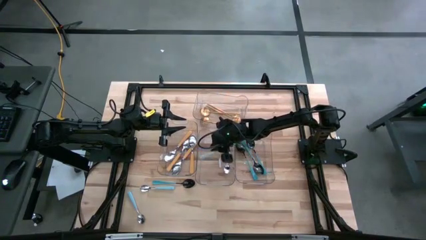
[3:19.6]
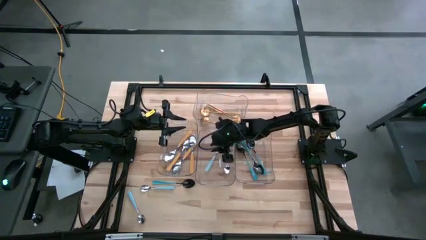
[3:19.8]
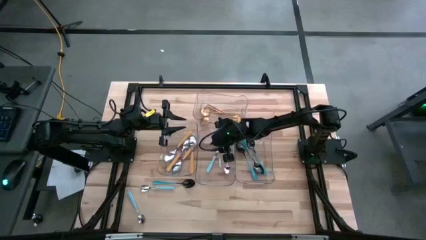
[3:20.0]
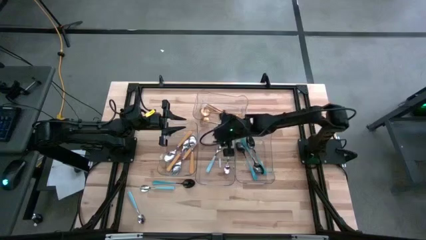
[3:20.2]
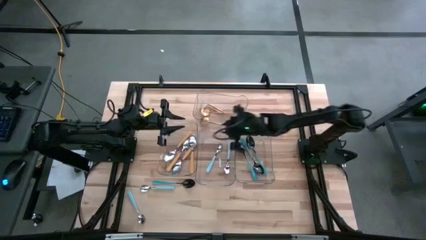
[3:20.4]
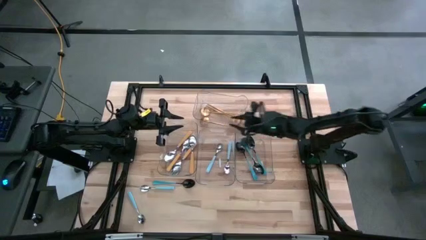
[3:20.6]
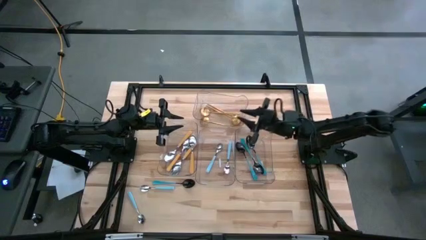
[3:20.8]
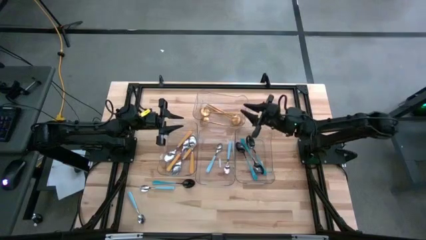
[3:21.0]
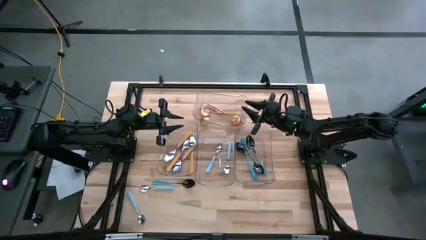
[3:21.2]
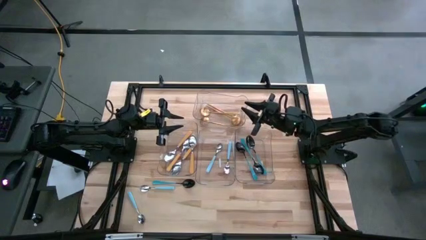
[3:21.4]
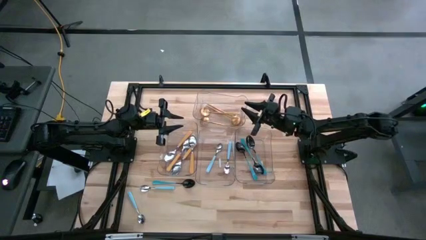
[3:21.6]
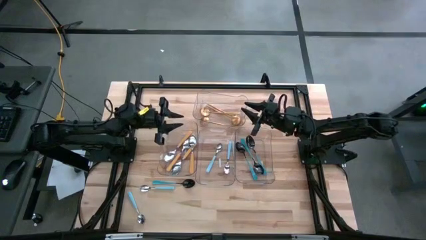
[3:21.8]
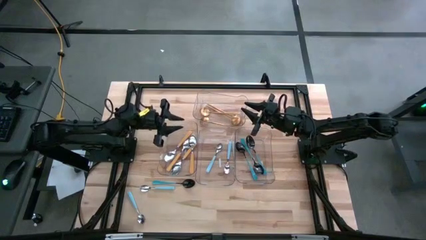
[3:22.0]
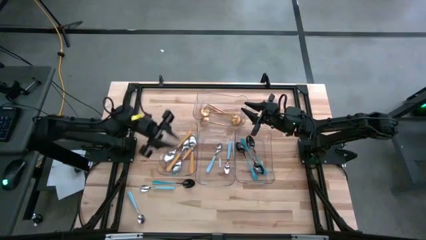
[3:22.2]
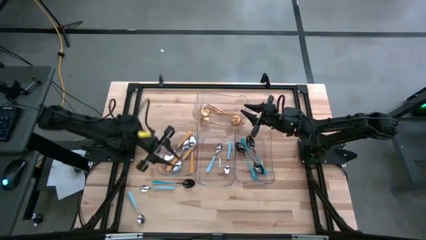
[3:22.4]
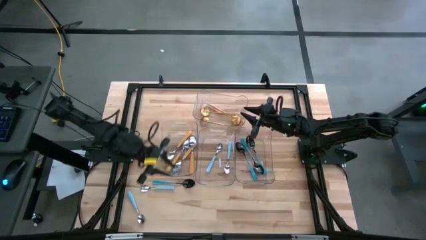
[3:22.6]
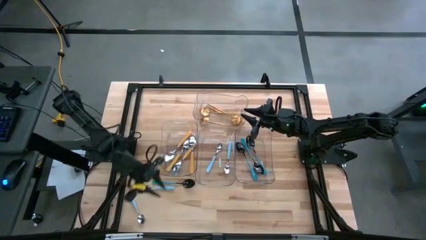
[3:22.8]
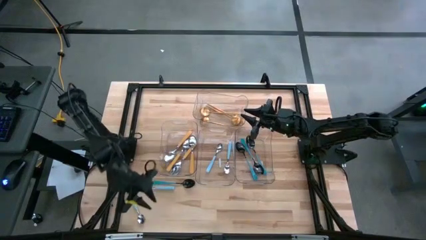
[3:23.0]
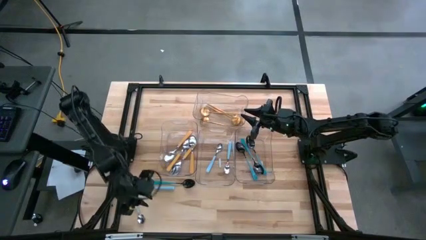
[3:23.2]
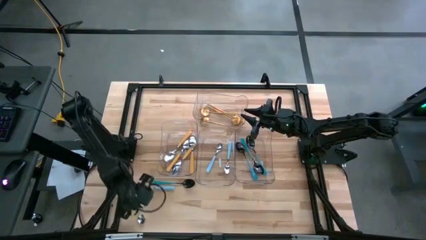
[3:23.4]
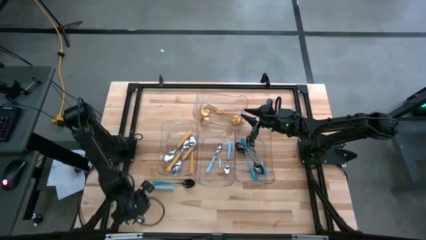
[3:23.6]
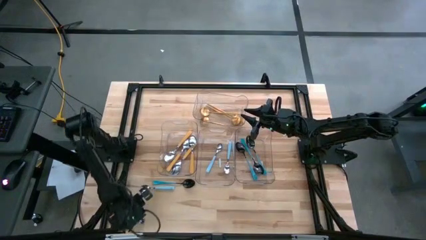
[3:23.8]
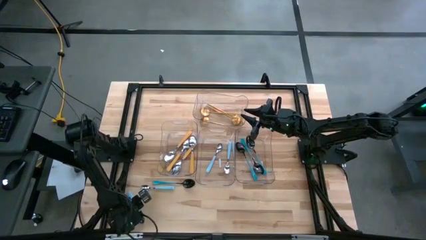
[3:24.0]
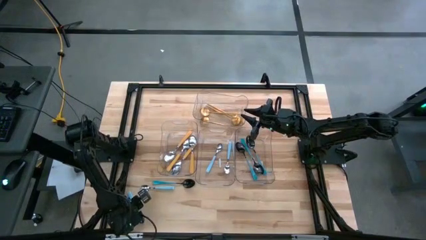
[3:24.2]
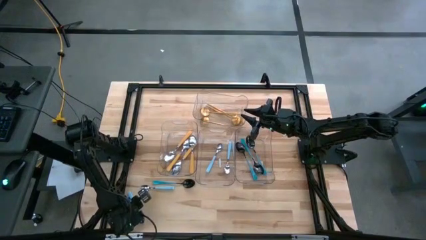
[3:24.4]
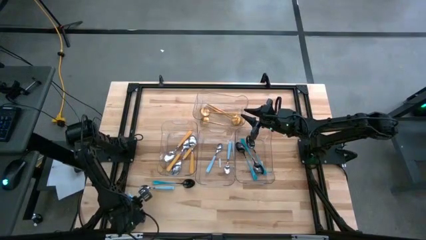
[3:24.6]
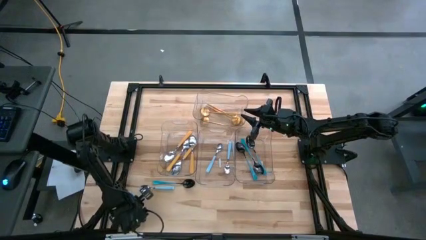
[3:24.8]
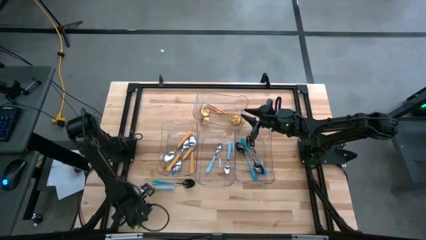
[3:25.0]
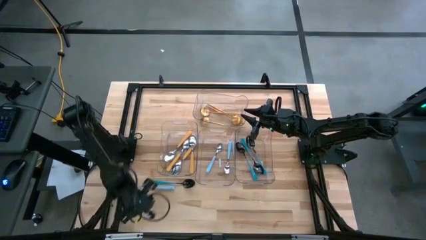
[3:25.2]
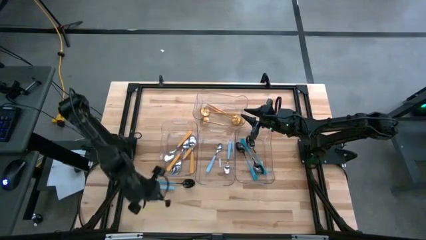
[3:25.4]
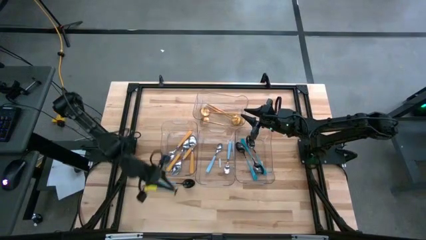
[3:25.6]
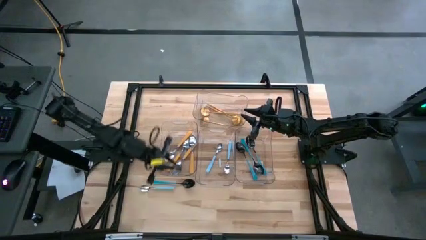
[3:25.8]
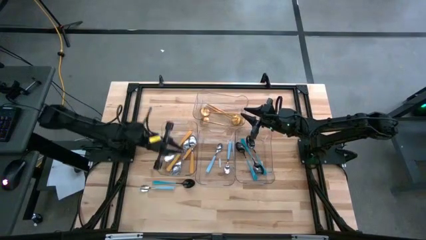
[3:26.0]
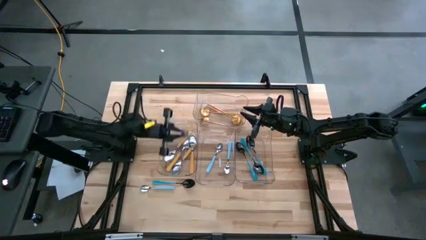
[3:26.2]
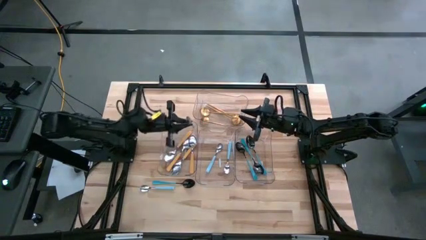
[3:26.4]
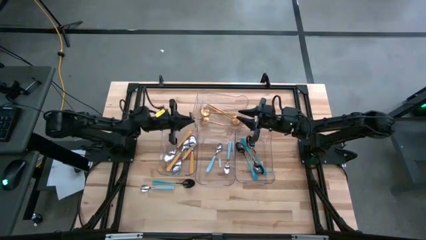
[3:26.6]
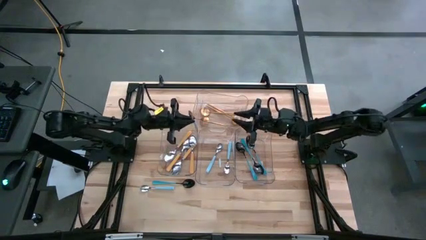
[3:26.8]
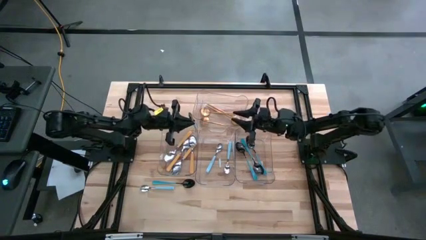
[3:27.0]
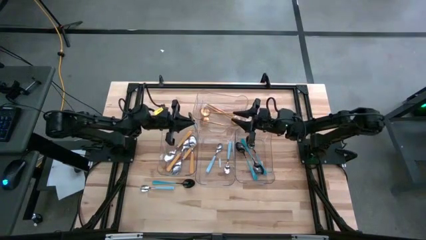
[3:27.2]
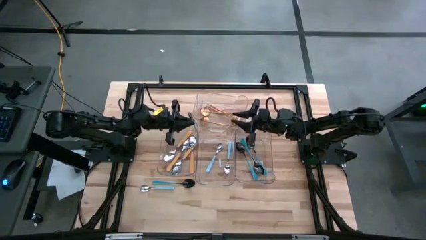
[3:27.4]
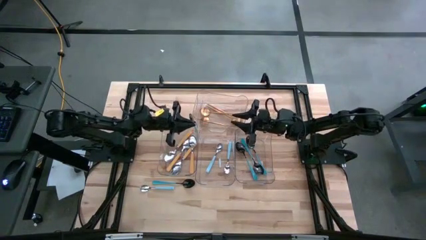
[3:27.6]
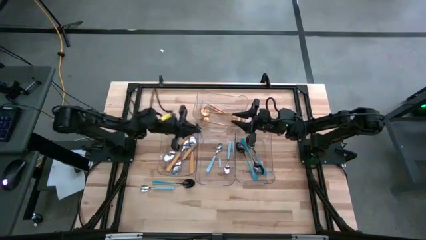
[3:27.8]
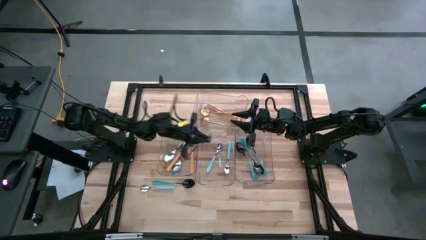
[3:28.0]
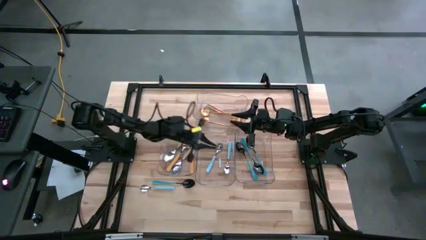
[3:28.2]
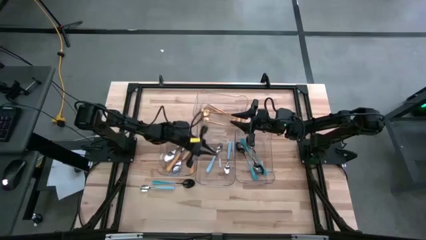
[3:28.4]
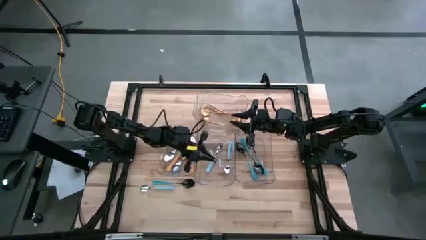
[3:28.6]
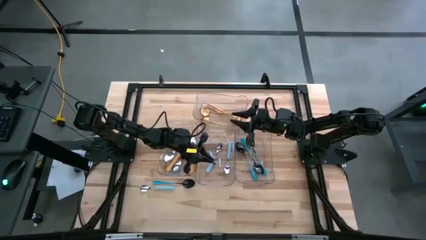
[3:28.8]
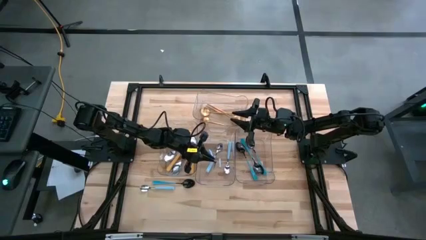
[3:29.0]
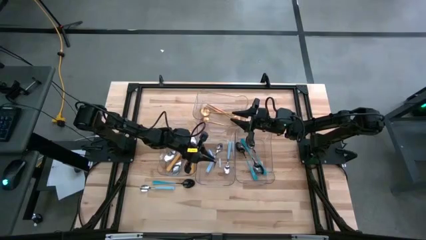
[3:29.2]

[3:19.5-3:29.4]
Task: Sort silverware by color (type)
Put the light blue spoon into the middle transparent bin

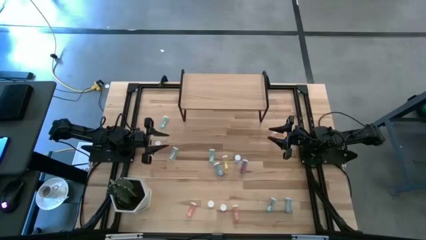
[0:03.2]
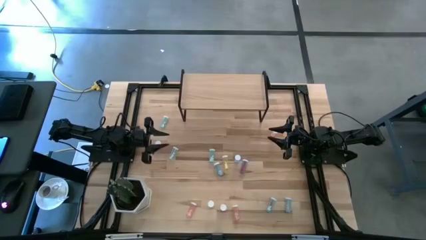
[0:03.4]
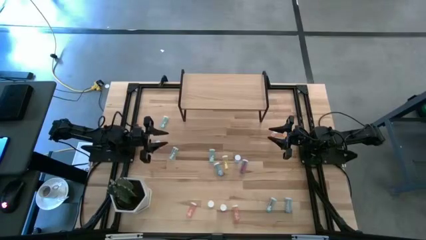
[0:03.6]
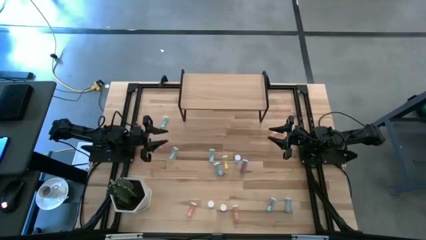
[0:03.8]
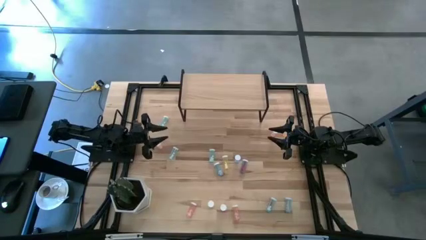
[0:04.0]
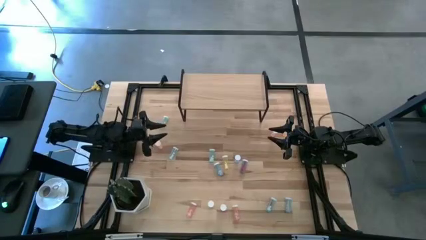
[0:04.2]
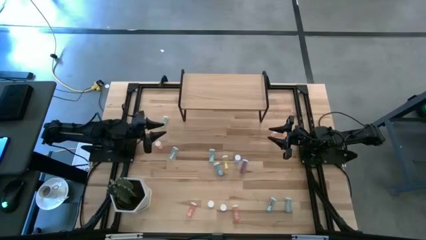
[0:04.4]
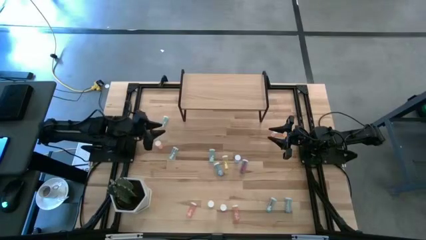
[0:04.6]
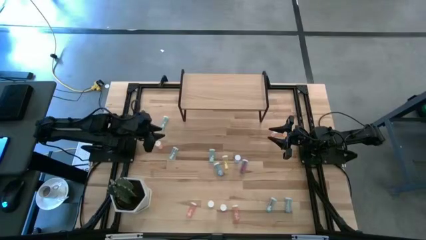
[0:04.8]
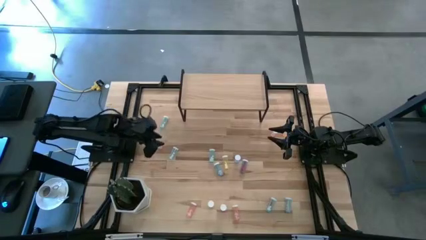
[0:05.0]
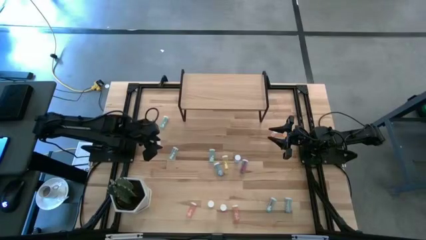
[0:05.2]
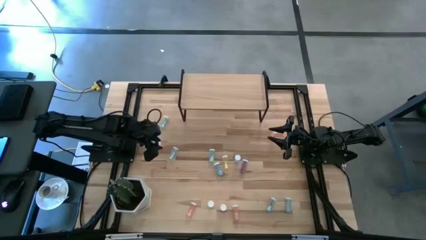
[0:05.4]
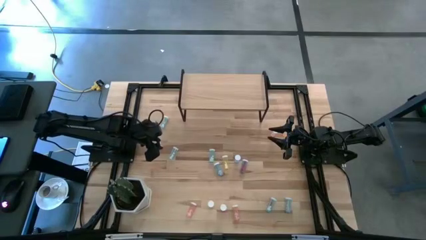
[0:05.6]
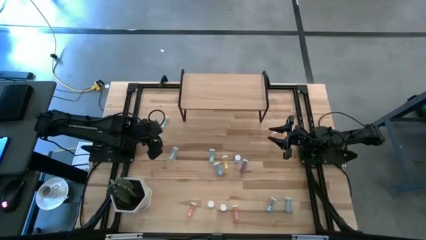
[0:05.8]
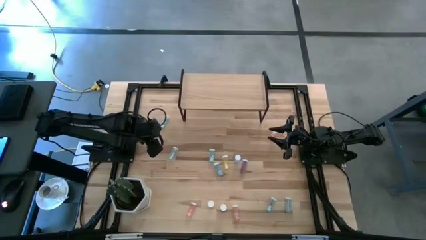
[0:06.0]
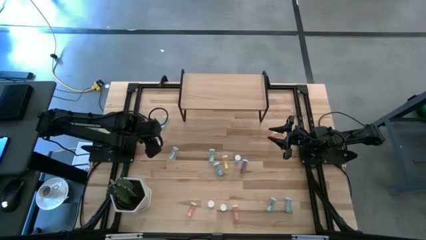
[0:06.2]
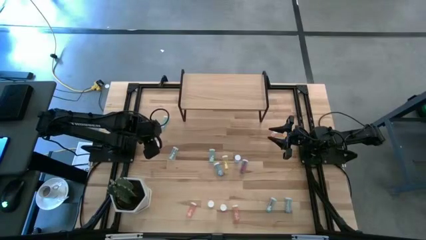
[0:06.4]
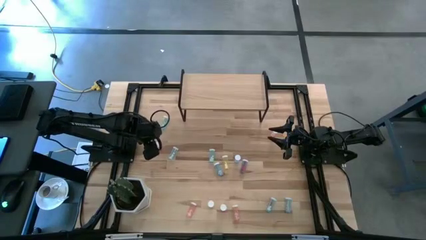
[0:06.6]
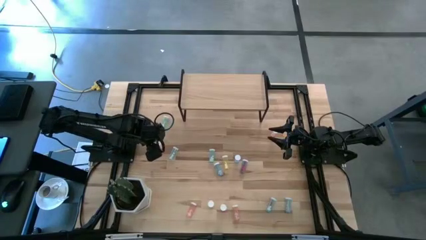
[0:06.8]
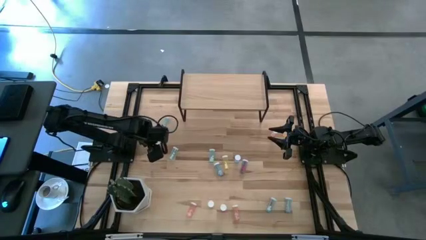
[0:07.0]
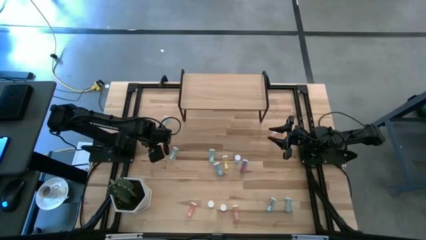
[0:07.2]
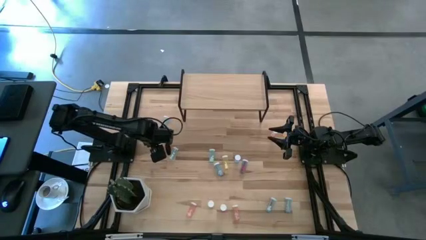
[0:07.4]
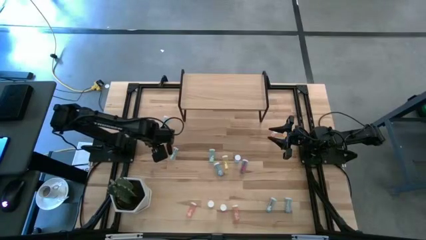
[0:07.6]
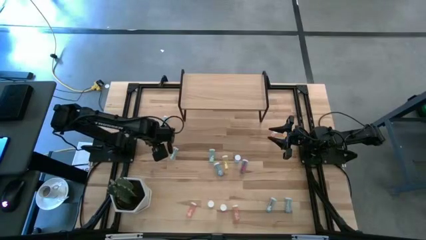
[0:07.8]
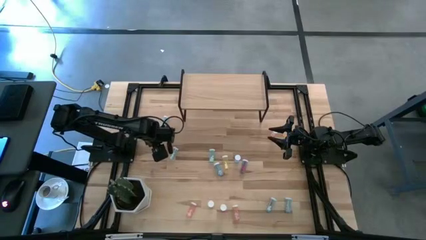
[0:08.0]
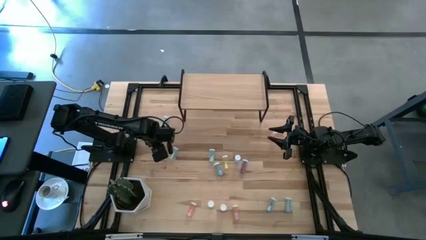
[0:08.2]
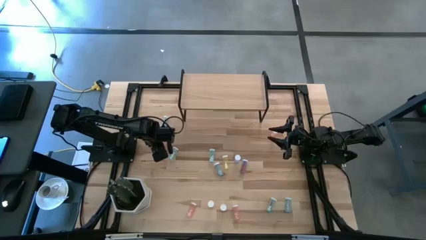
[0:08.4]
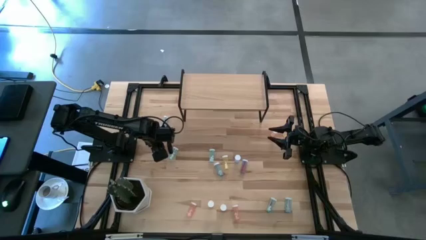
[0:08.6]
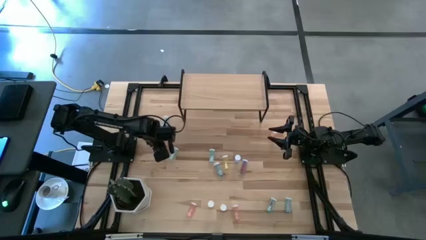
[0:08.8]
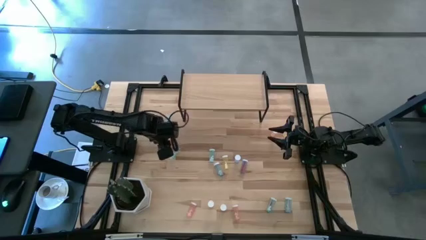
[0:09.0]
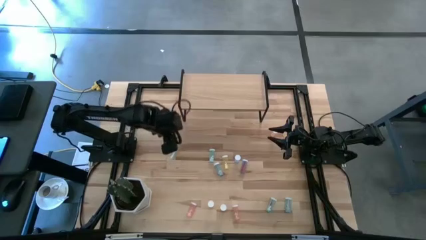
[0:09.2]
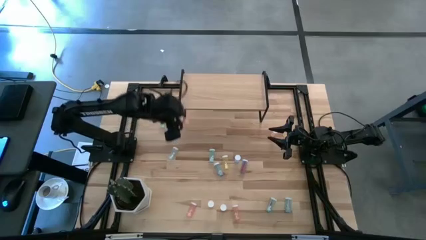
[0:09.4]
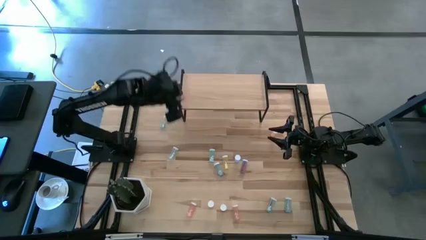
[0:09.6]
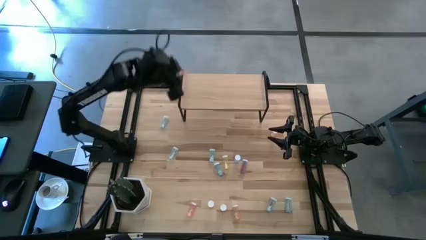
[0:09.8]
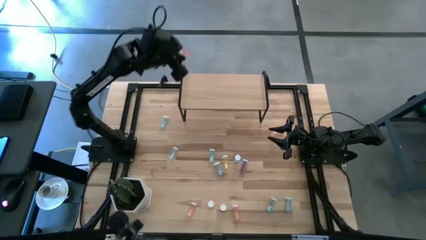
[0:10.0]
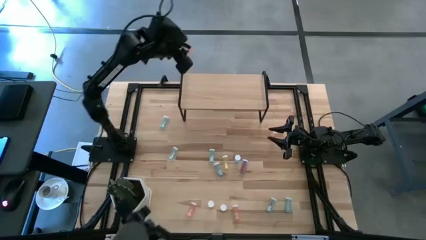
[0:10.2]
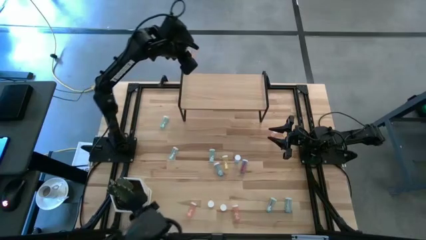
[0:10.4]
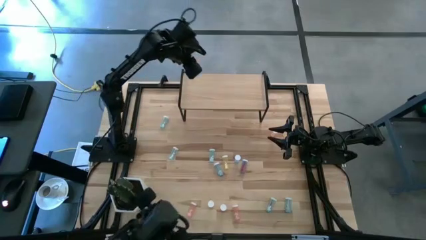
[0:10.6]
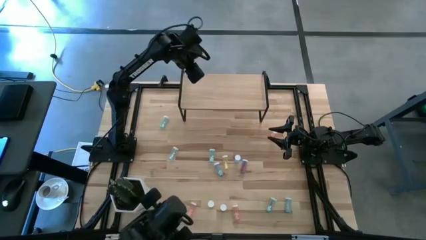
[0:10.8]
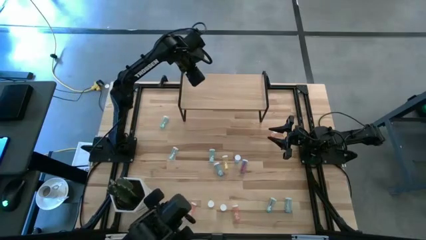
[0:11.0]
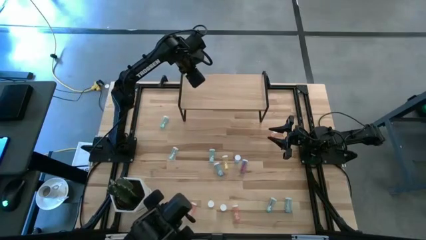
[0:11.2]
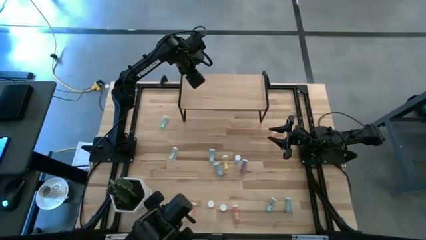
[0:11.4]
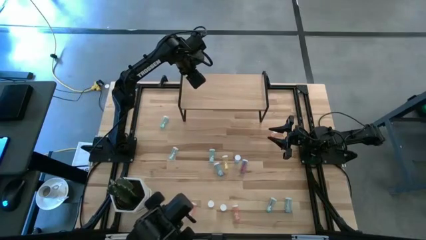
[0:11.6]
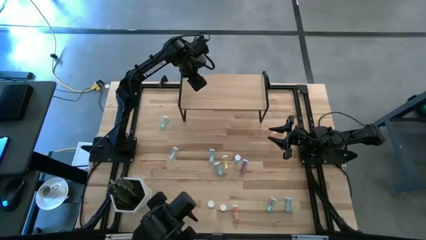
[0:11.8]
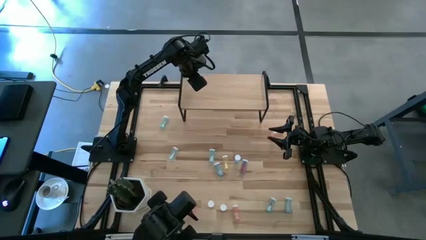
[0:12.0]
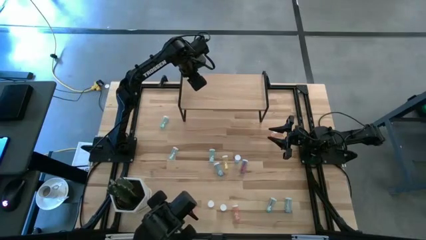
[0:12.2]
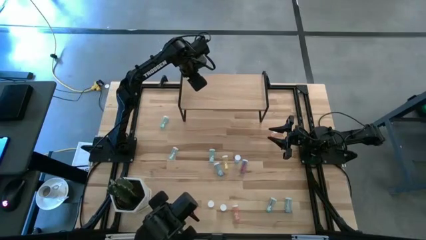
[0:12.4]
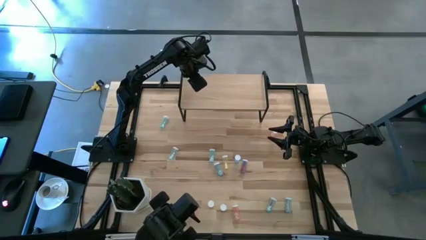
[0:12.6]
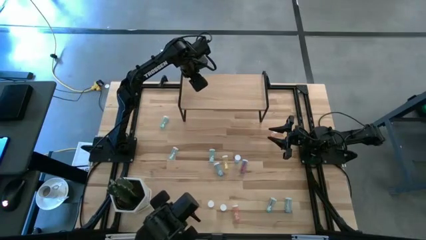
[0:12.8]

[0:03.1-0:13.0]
Task: Pick and place medicine bottles onto shelf by color
Put the pink pill bottle on the shelf
